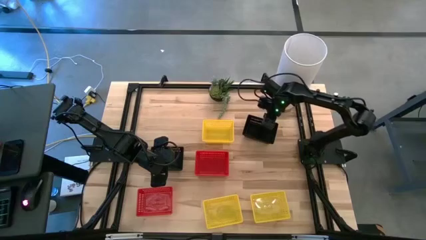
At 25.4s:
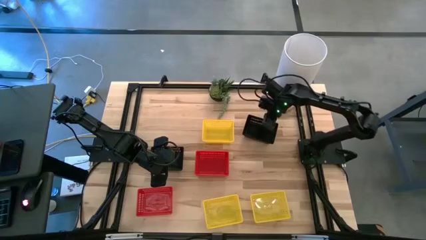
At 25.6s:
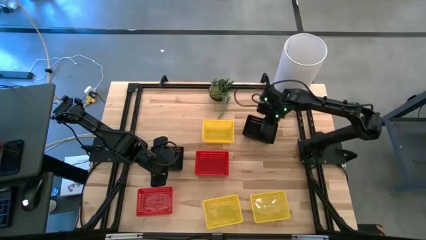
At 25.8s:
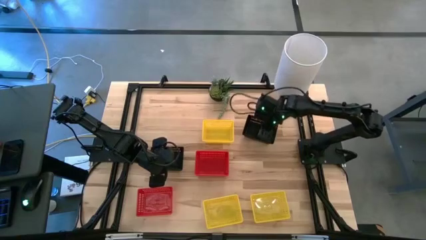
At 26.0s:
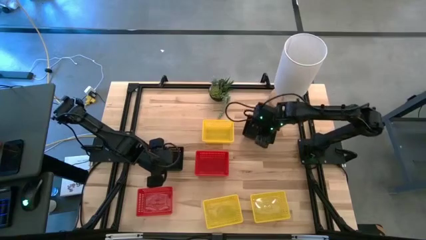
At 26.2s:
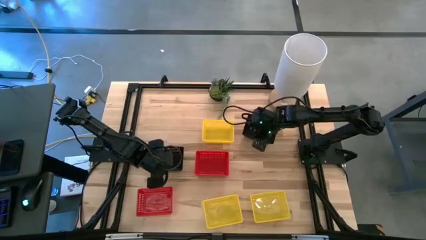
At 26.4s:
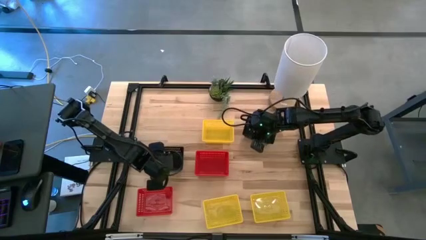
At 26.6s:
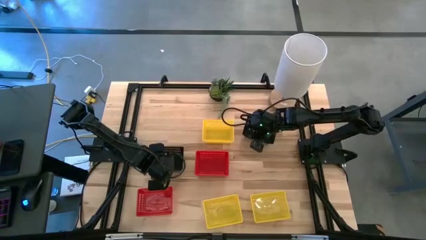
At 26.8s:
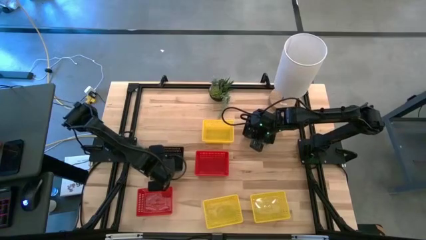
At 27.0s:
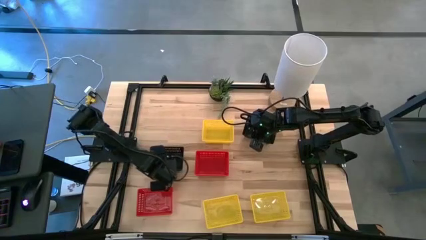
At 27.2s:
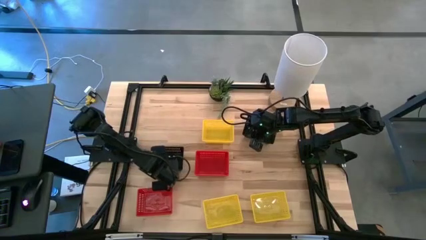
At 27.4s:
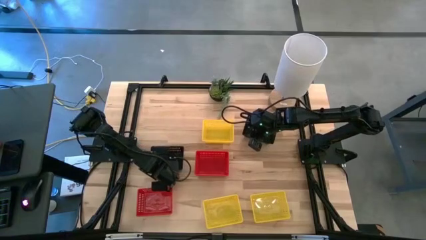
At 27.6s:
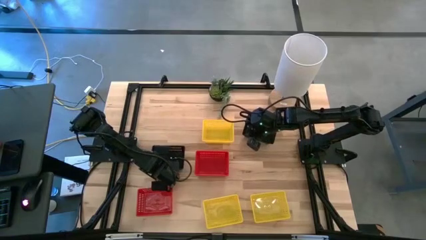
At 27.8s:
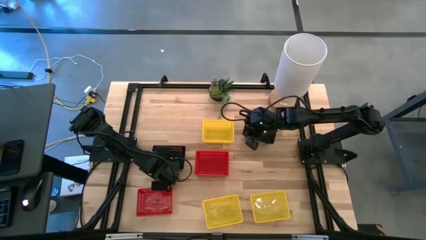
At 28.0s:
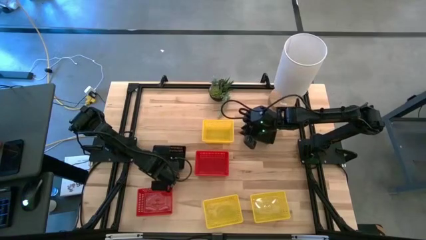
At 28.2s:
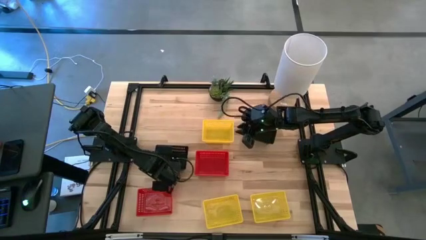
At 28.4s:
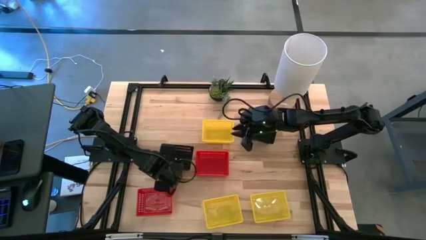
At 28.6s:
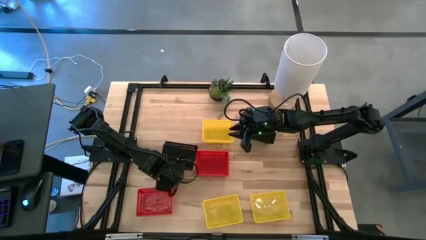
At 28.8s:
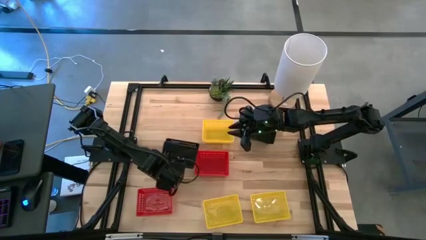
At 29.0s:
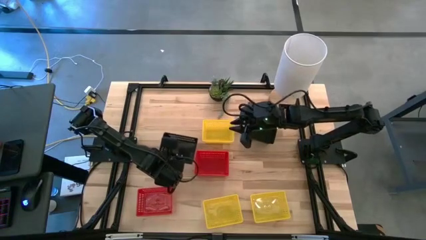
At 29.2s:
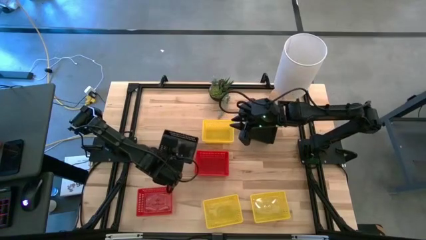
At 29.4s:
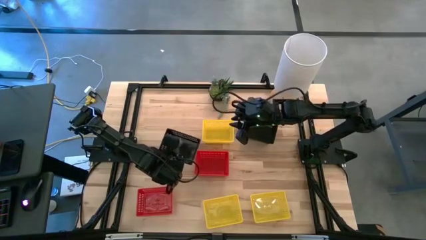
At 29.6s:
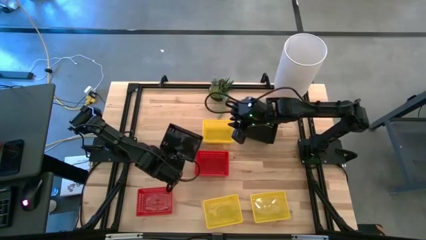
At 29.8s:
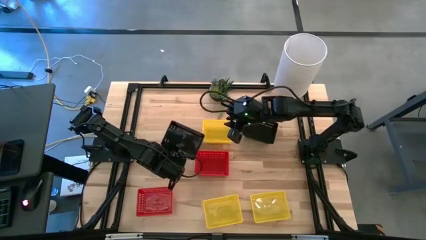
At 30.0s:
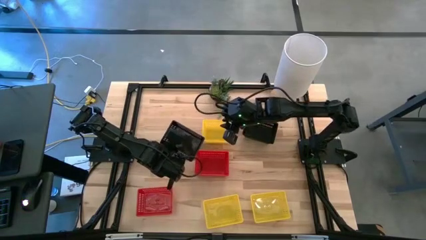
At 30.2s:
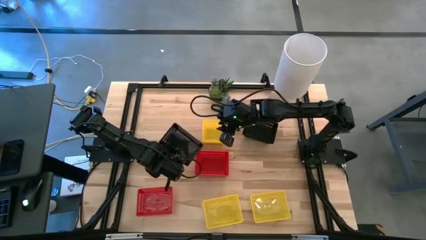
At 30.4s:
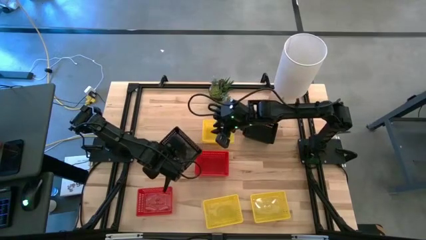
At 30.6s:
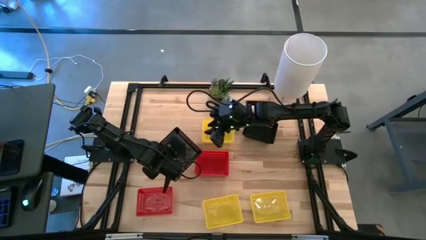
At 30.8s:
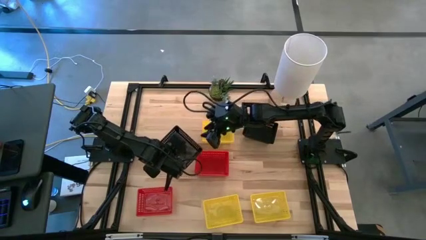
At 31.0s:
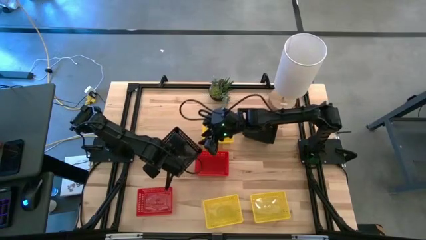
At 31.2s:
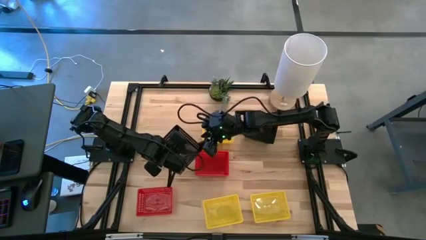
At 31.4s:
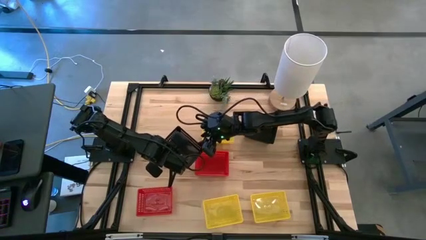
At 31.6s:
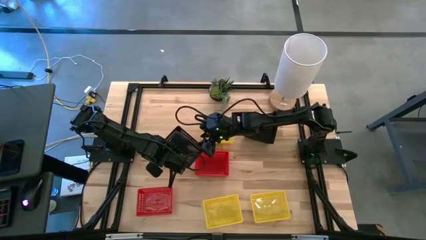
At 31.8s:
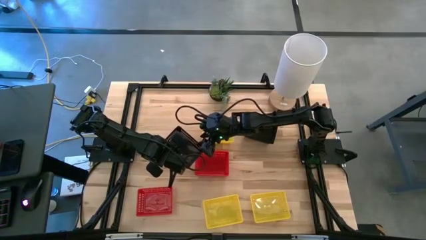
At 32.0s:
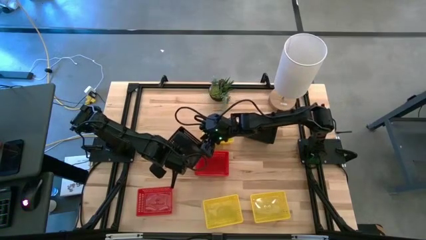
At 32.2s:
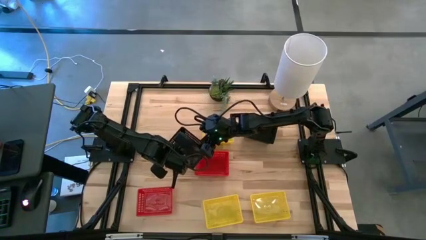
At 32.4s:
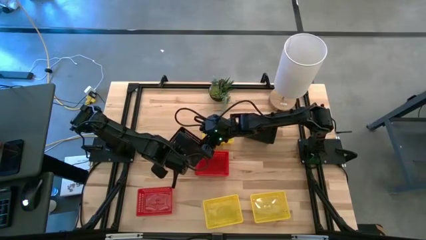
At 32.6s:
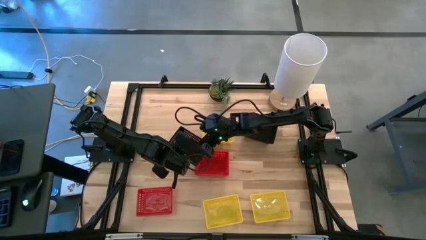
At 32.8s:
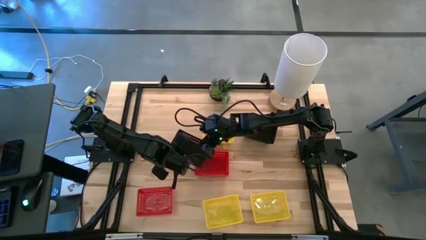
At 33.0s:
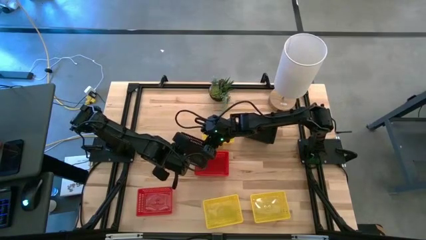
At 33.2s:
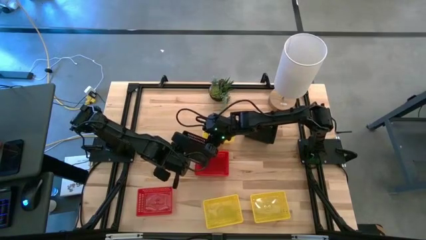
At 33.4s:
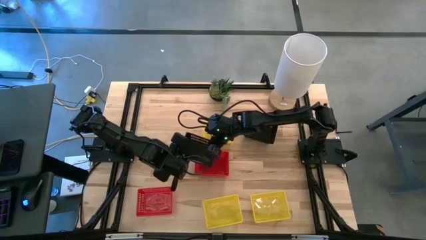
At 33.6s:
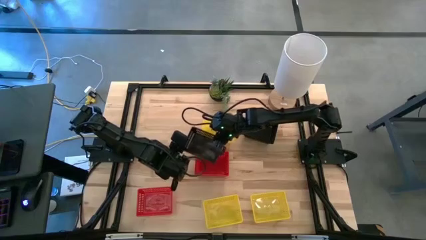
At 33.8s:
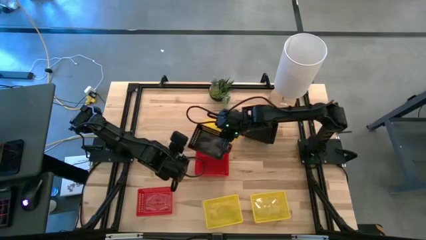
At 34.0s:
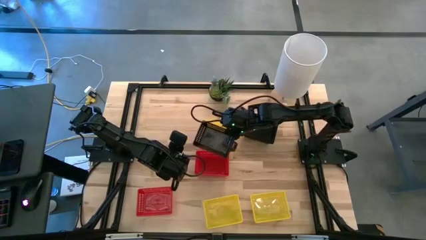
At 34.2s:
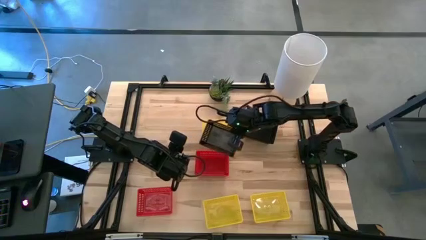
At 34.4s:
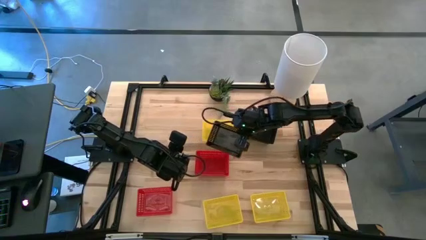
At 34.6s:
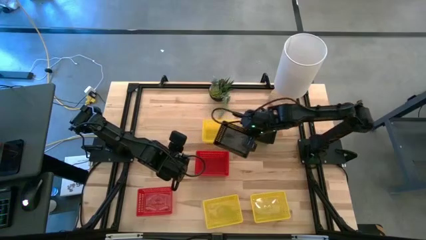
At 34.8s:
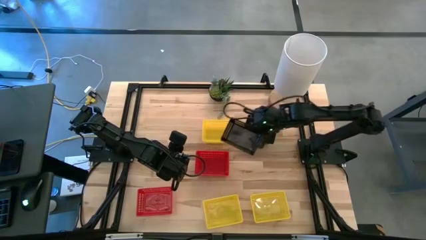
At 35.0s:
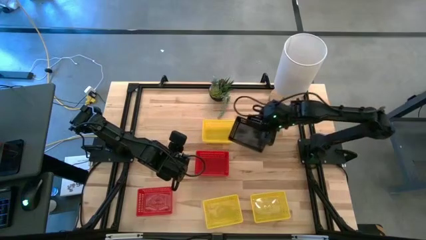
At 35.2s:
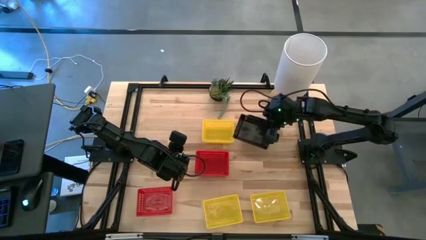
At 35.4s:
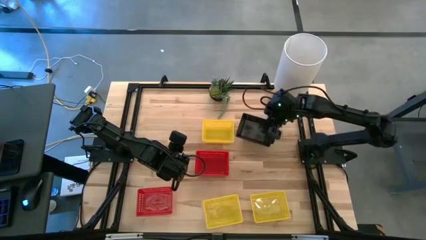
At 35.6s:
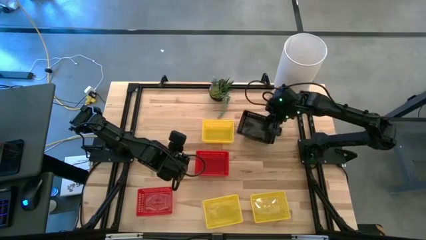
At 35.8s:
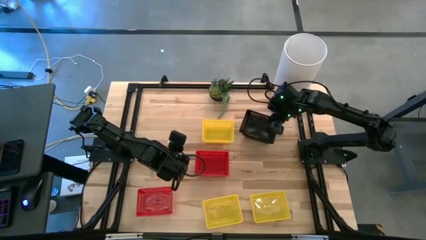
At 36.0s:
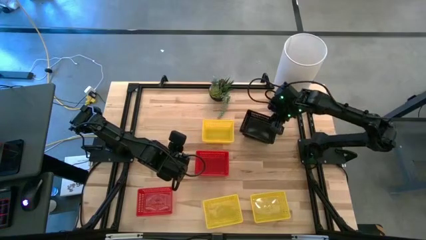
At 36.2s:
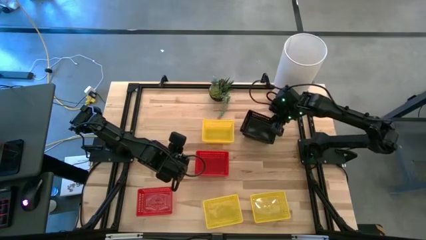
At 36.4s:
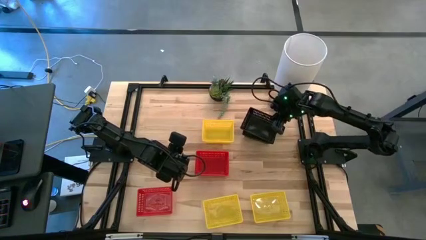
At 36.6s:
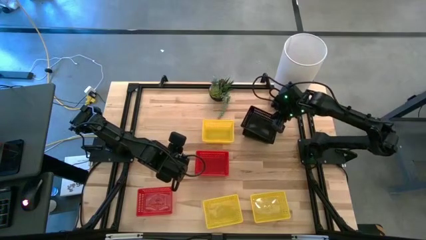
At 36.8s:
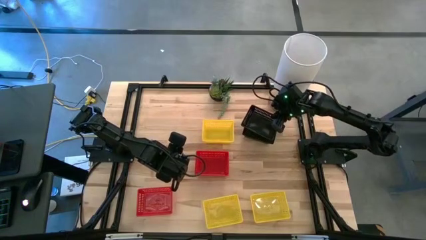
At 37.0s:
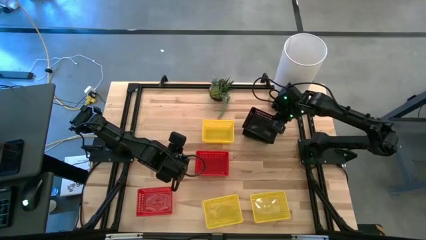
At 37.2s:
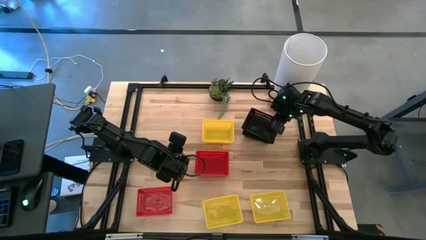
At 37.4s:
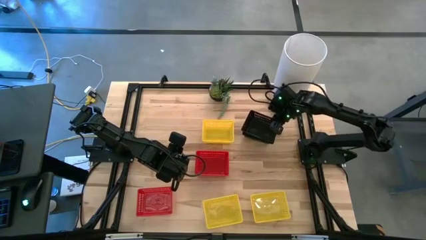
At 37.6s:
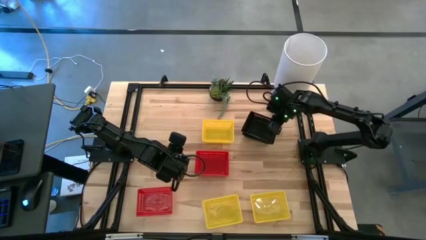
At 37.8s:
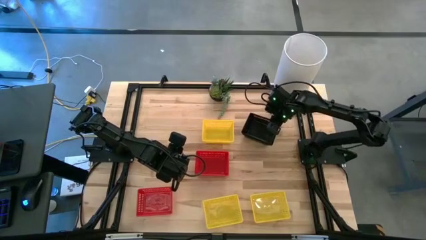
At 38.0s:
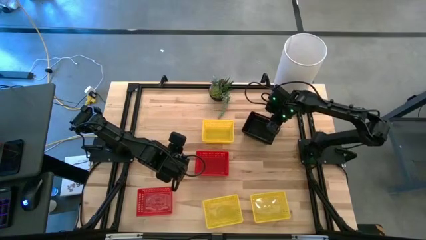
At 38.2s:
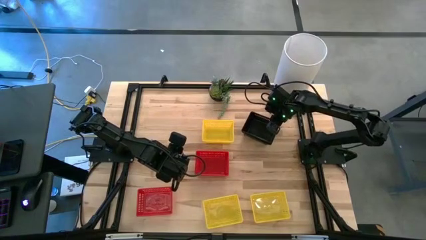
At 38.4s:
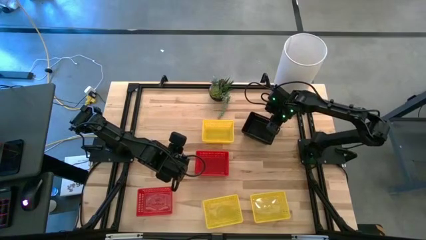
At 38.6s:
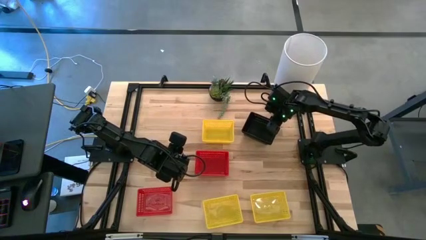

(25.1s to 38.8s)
Stack the bottom black bin on the top black bin

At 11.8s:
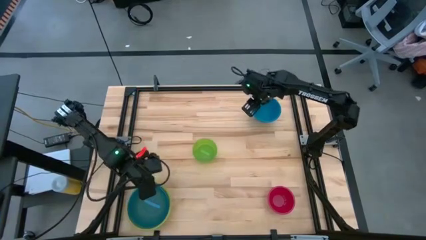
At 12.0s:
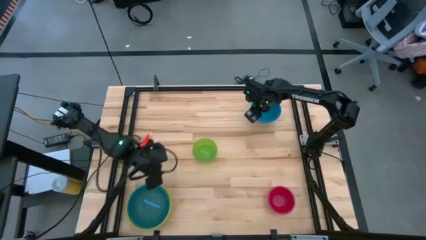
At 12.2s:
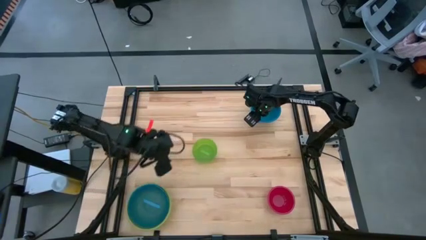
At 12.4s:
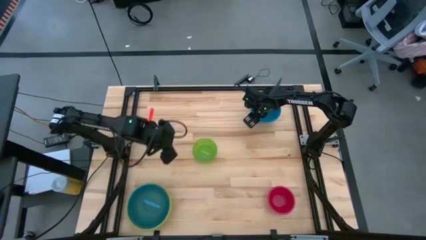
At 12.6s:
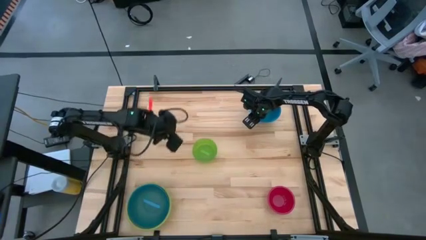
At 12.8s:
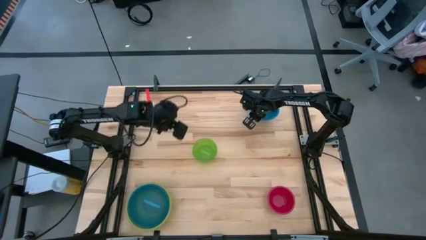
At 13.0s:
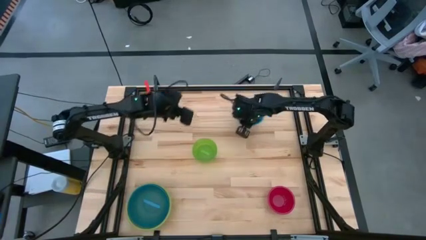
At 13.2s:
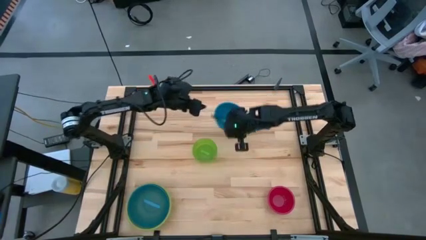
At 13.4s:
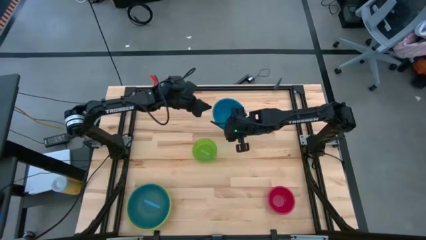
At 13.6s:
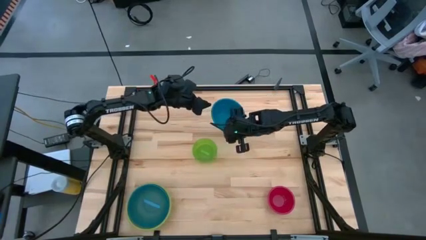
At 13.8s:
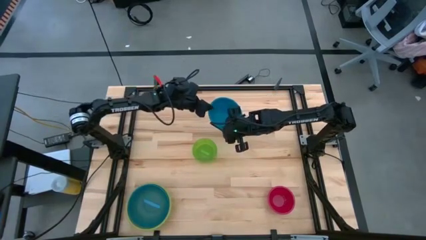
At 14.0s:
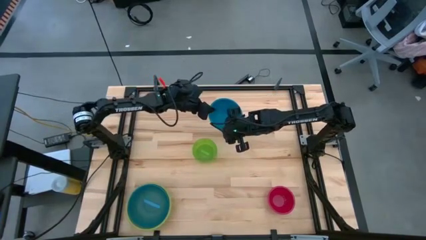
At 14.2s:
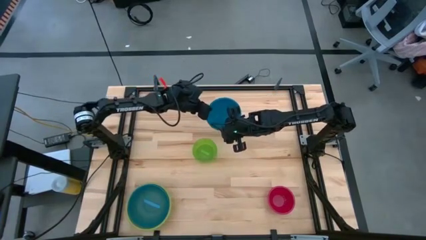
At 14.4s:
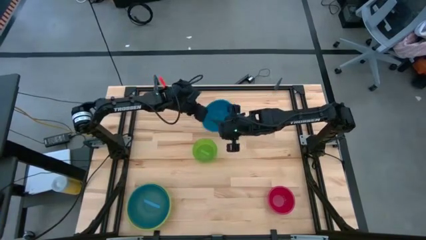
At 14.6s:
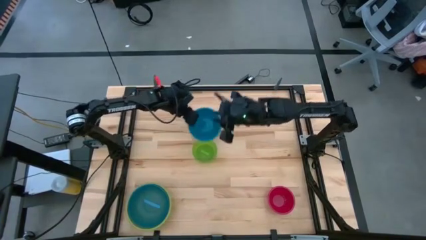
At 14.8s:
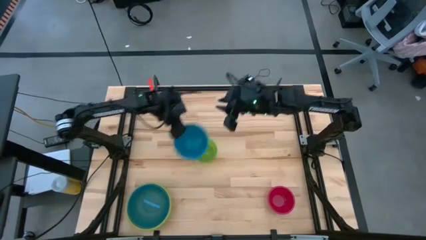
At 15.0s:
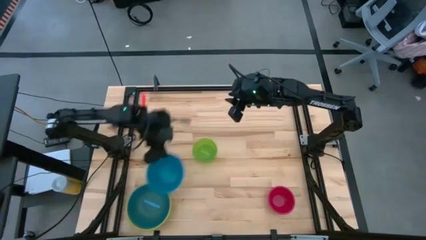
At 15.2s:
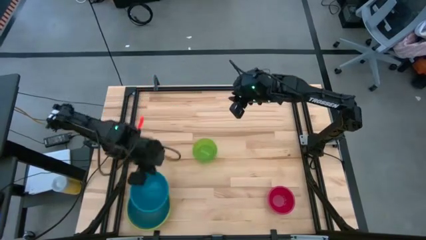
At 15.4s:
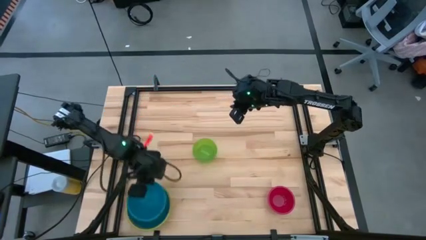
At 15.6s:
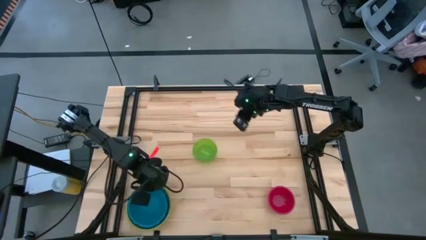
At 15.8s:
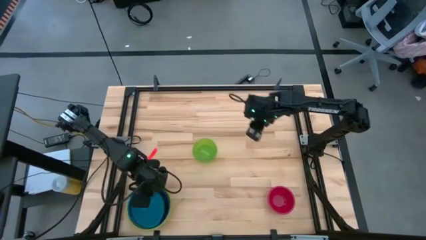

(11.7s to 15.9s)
Stack the blue bowl on top of the light blue bowl
